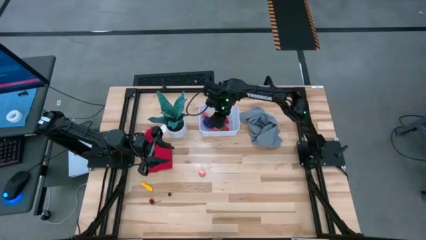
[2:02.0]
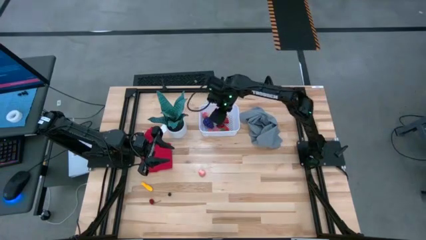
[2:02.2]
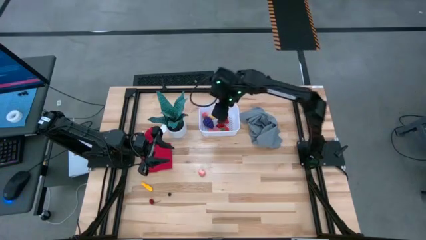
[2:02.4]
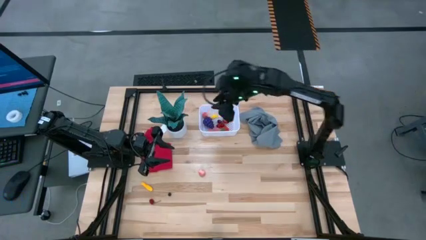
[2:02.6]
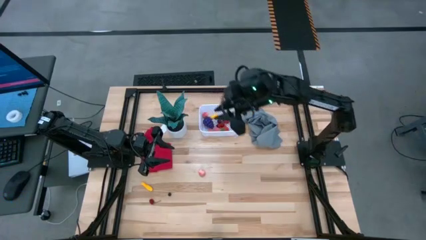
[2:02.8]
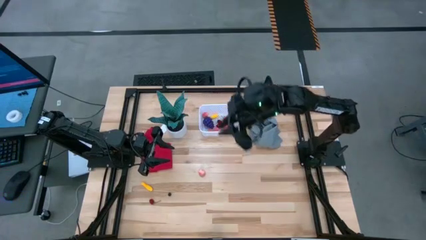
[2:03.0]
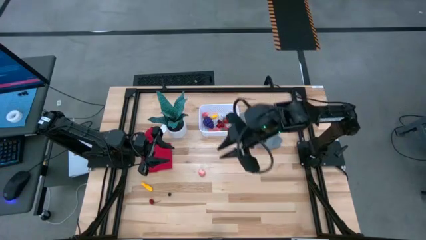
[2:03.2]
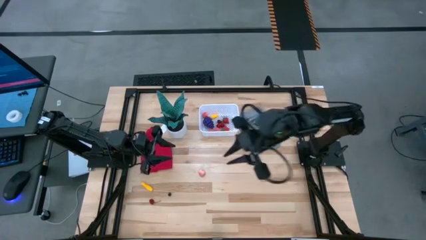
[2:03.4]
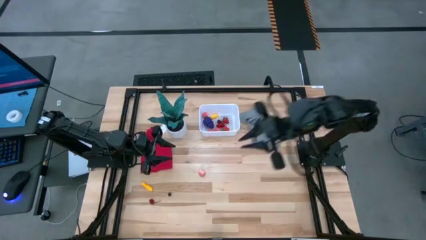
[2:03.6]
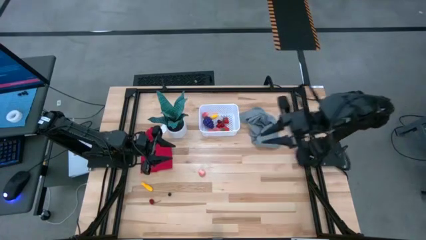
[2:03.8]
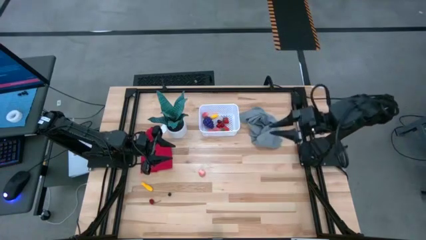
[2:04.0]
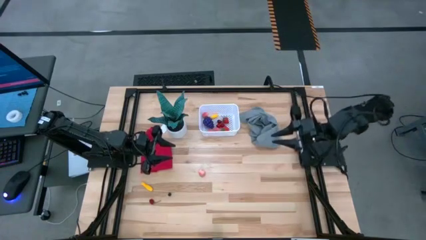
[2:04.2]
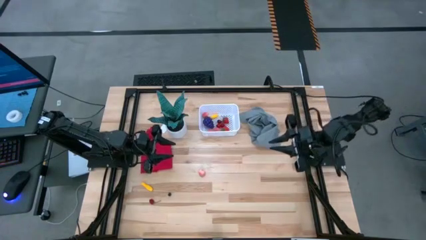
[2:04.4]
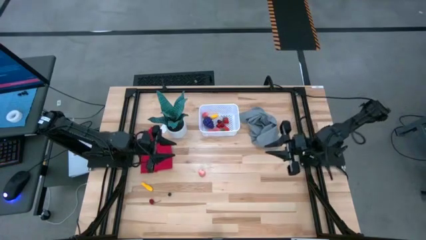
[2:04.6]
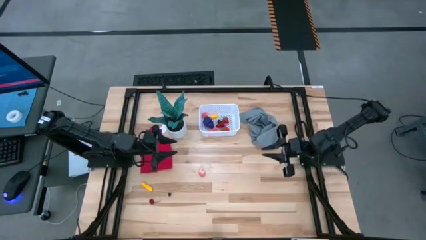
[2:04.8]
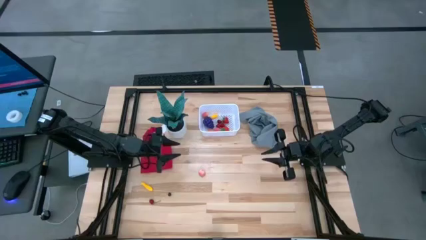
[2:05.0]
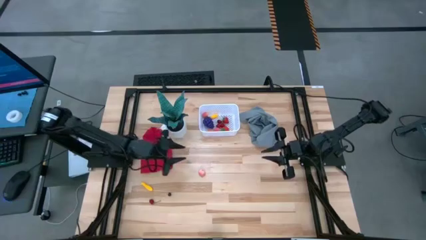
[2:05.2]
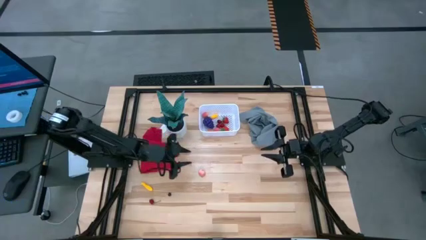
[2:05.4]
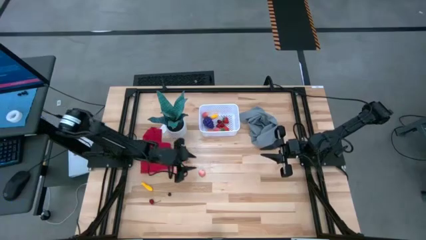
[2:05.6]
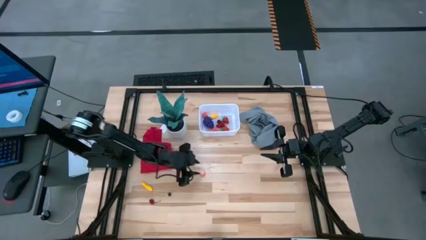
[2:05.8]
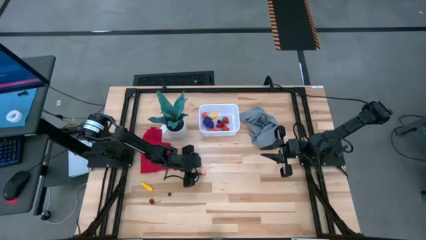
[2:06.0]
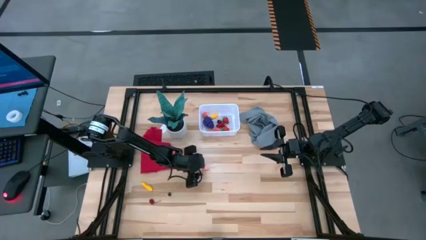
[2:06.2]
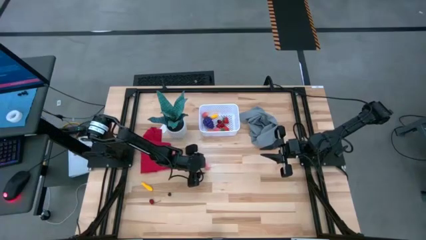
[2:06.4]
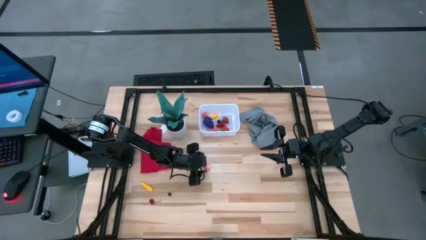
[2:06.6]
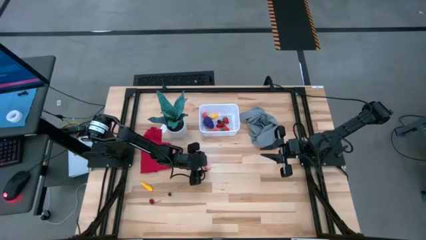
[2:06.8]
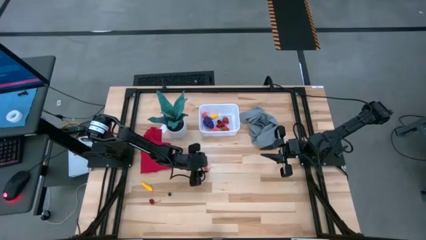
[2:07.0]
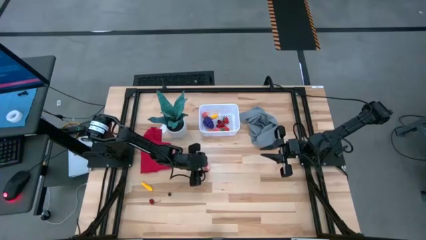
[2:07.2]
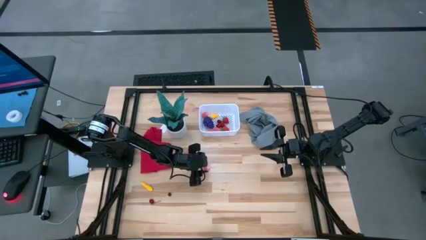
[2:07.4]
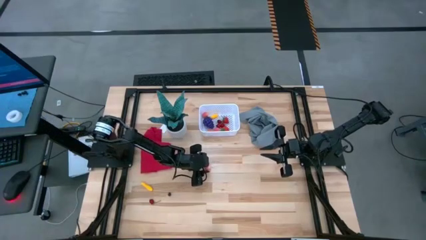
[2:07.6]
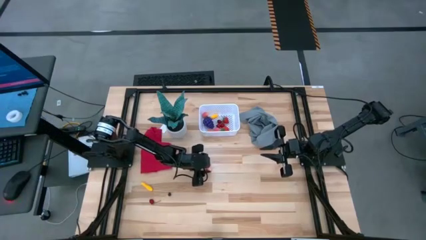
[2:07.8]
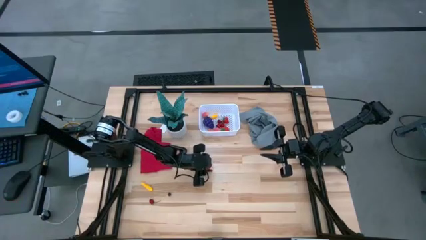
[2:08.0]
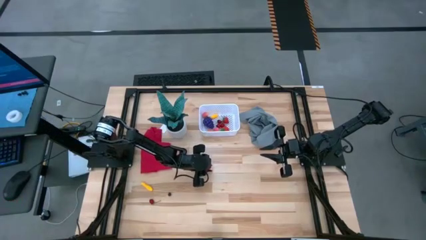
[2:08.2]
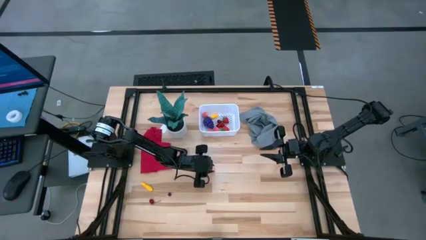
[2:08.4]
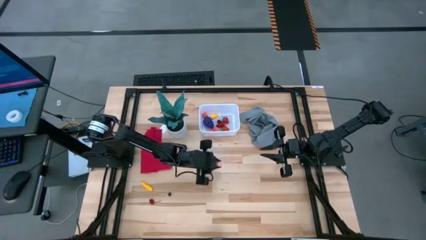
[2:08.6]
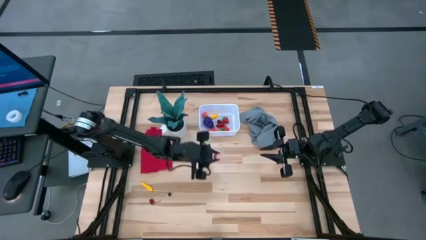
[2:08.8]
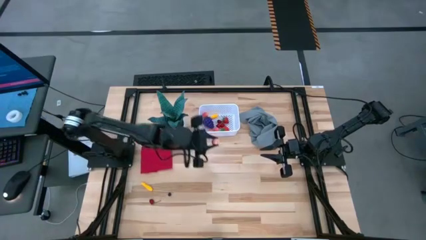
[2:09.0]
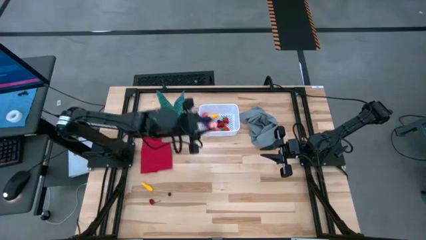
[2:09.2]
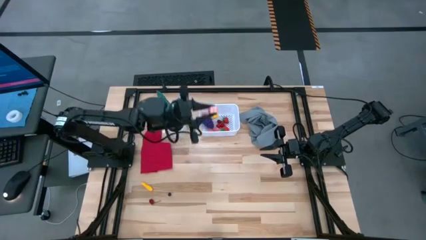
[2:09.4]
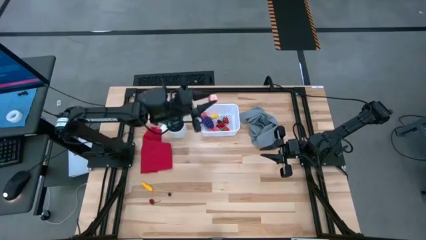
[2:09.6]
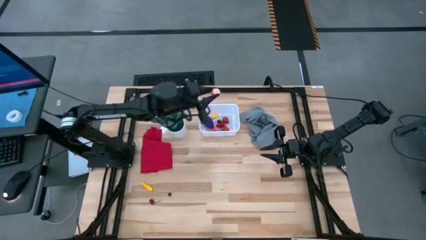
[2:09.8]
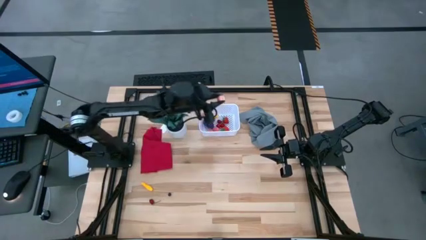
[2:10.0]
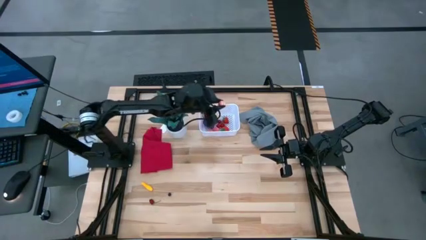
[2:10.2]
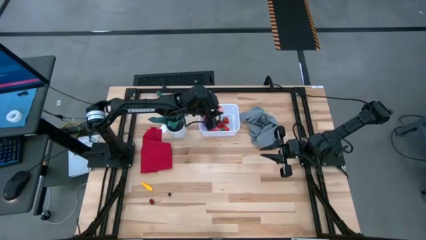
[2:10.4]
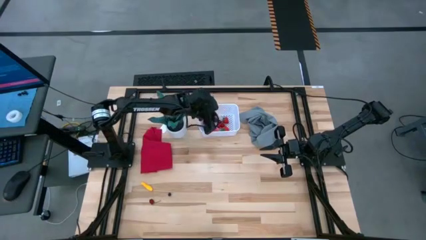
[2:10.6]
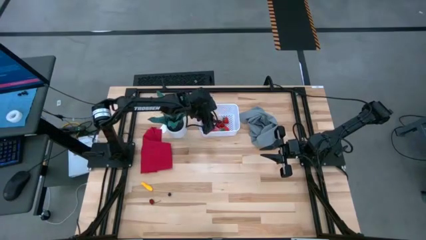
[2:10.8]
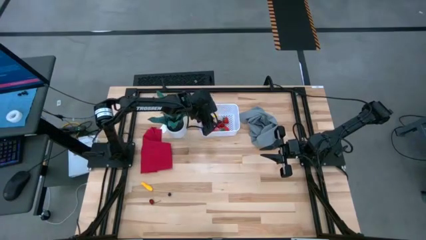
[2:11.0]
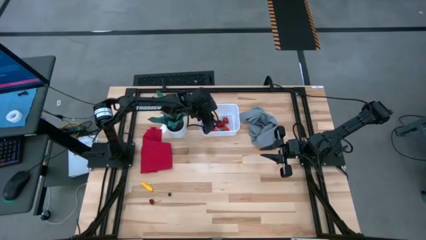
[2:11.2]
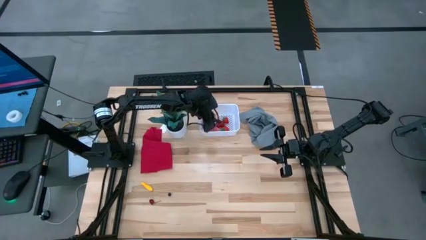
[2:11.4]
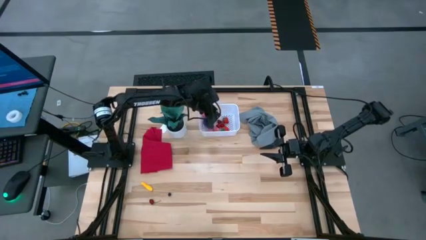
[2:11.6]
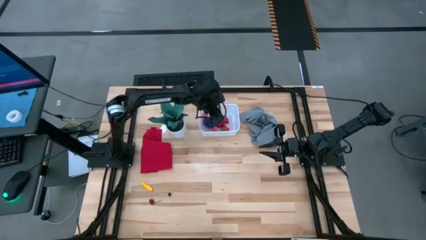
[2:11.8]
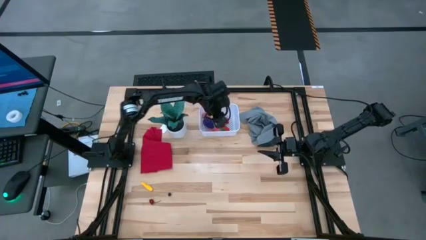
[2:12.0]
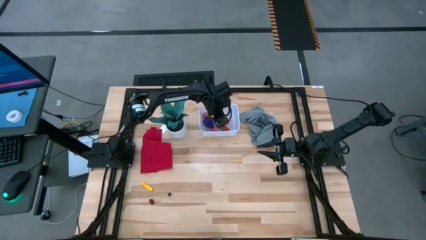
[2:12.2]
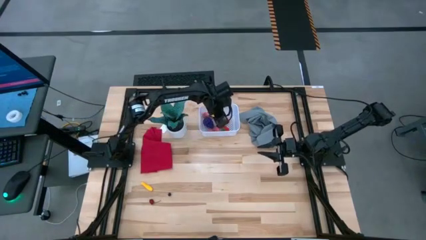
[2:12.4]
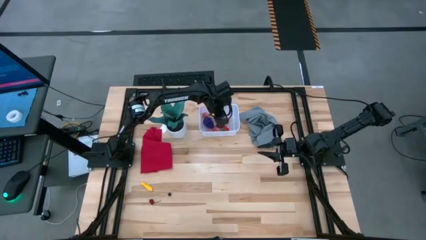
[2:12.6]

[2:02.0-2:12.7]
Task: Pick and placing Produce into tupperware
Put the pink peach into the white bin

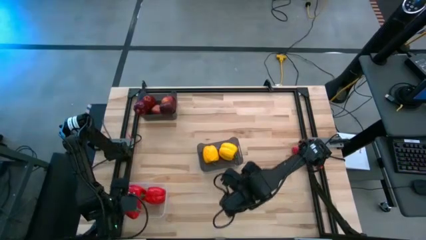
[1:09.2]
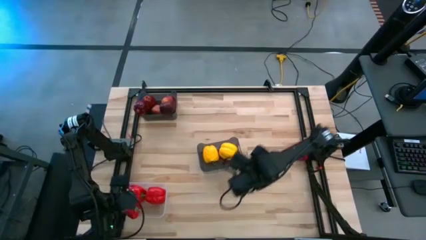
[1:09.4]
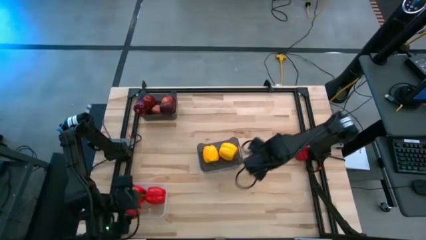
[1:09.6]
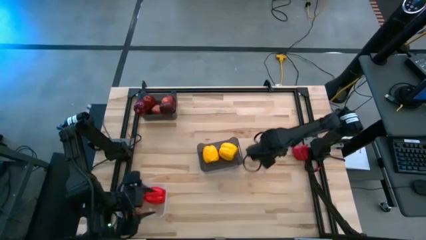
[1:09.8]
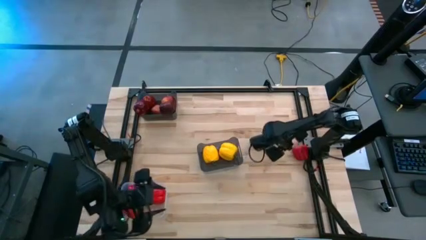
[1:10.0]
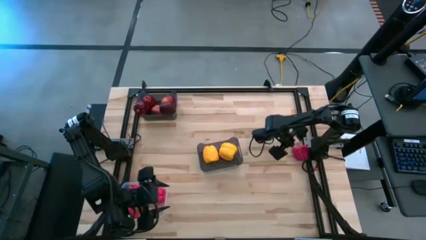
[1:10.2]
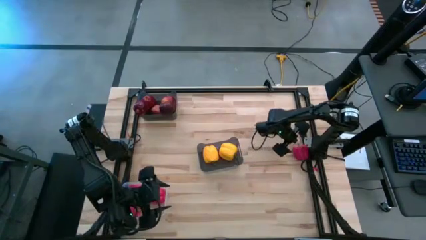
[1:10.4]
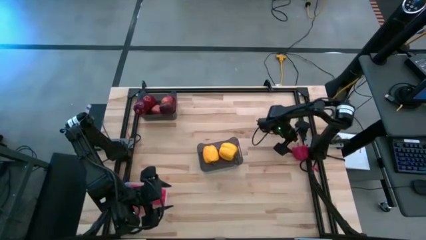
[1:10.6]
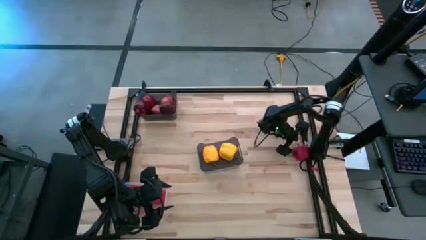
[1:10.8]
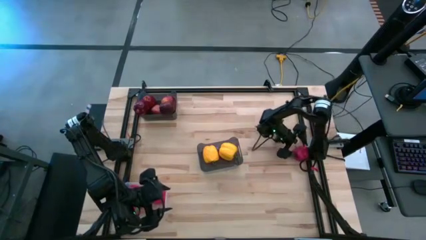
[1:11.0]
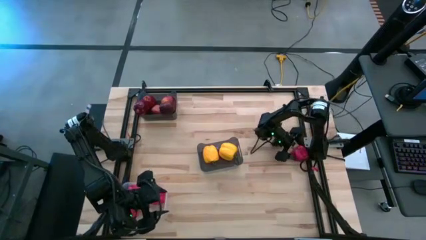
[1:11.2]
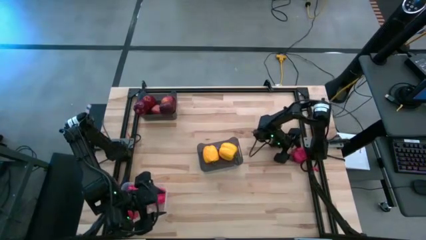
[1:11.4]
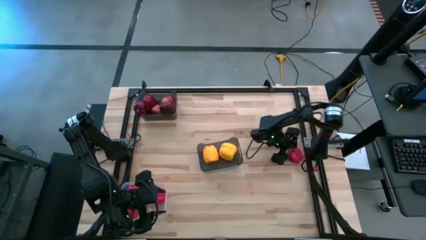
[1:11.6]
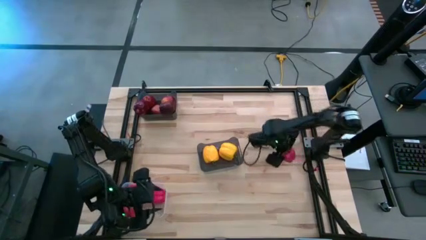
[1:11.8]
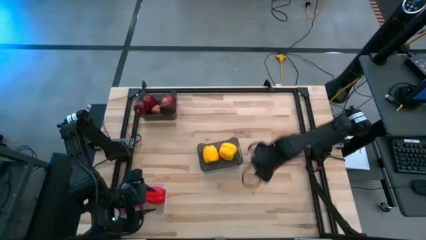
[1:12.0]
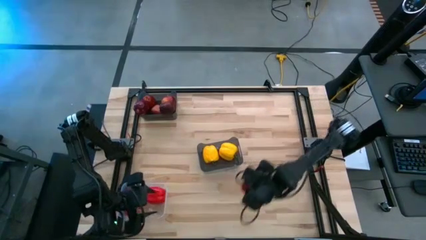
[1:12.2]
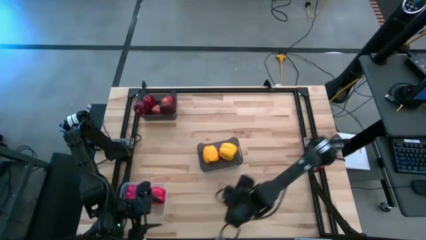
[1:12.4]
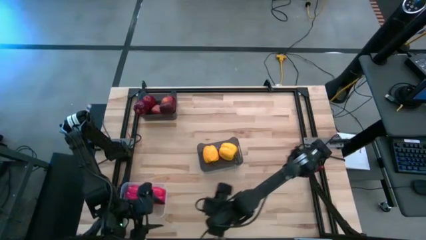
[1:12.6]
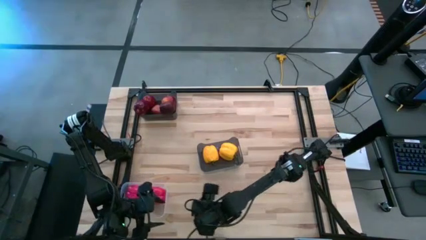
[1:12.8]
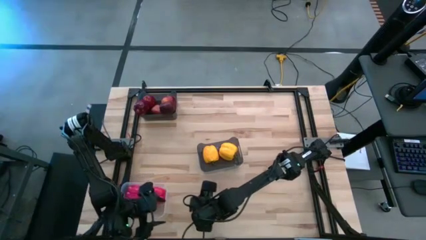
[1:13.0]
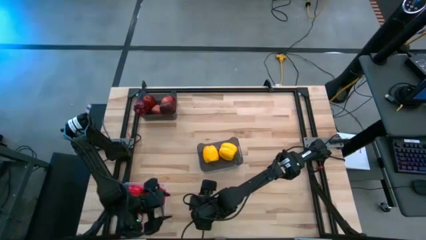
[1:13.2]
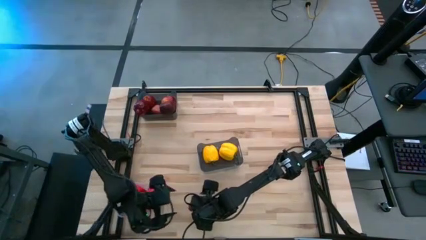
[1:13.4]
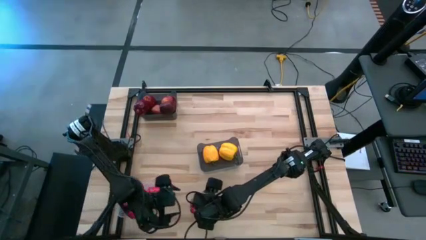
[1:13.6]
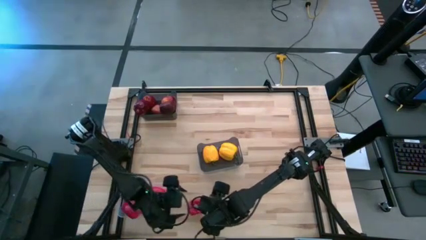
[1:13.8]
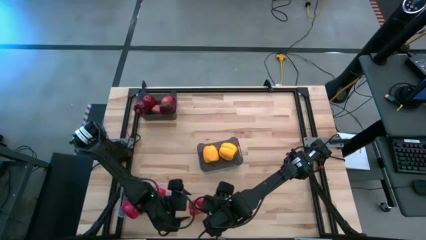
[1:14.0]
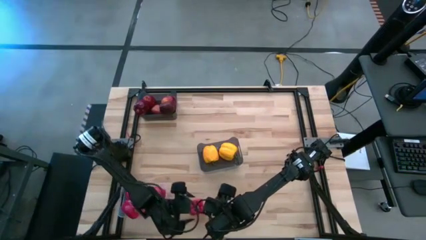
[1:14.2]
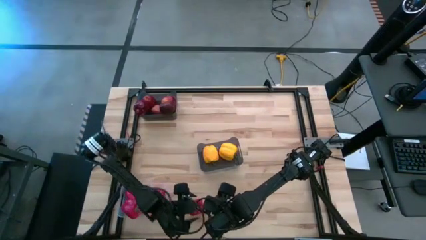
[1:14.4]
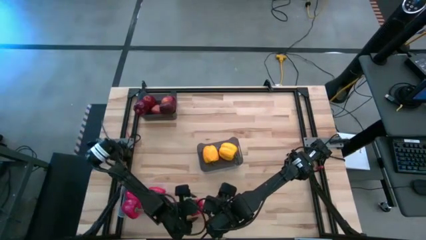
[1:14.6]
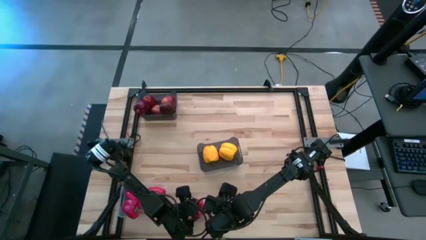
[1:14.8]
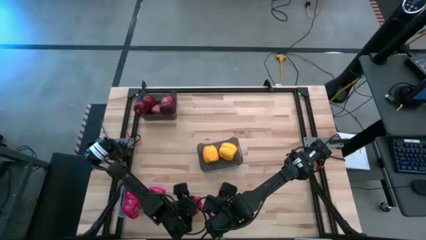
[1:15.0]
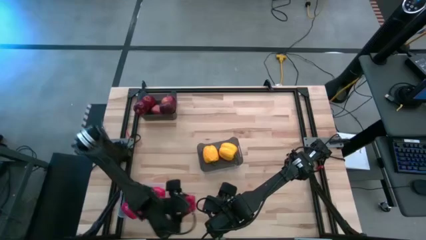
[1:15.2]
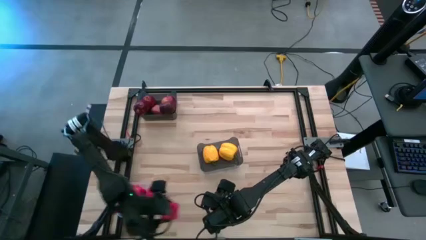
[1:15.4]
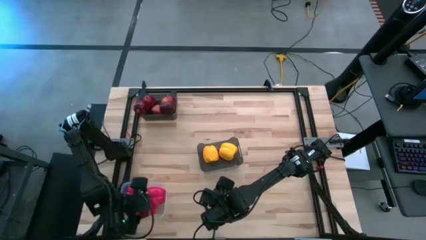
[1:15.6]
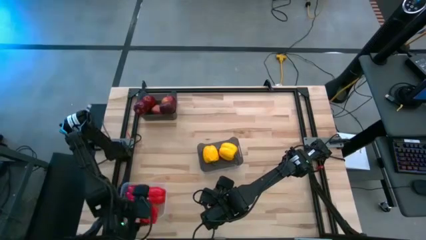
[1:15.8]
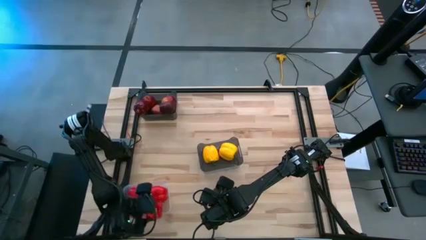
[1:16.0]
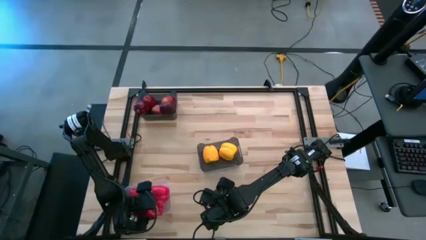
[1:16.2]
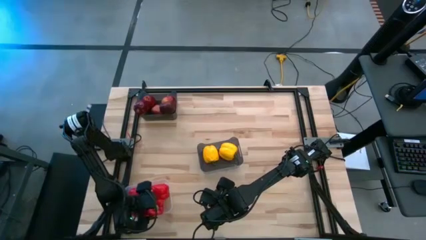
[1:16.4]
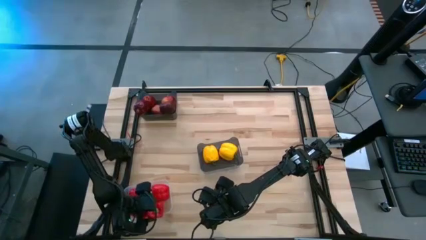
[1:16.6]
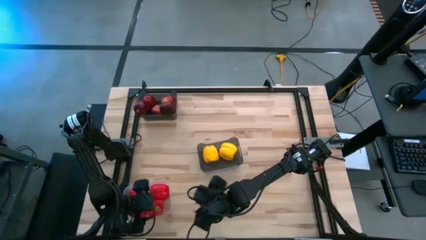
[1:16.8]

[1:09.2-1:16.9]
Task: Sort produce into baskets
Put the red bell pepper into the transparent bin
